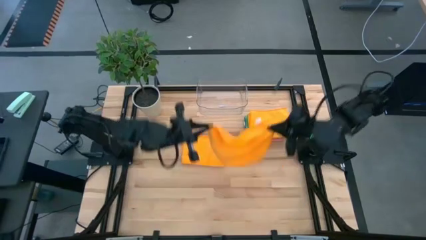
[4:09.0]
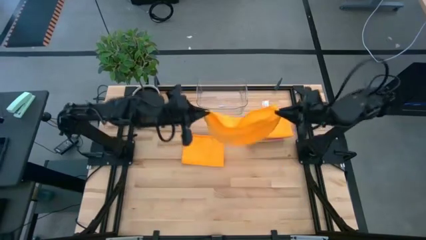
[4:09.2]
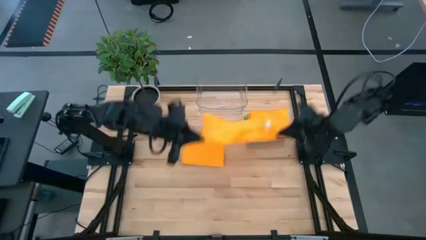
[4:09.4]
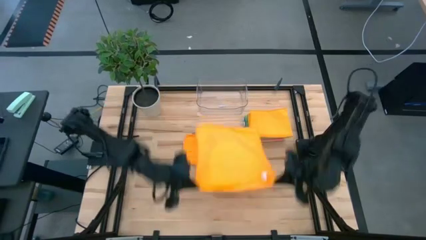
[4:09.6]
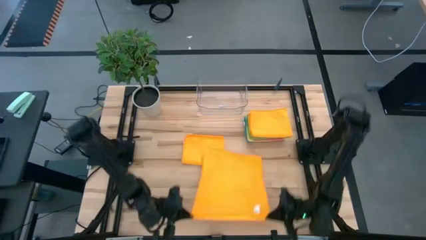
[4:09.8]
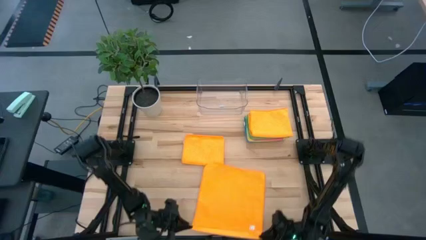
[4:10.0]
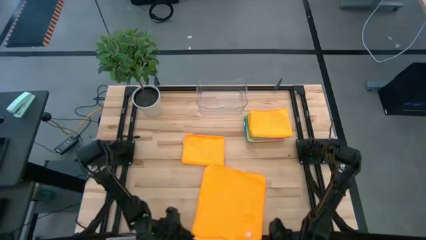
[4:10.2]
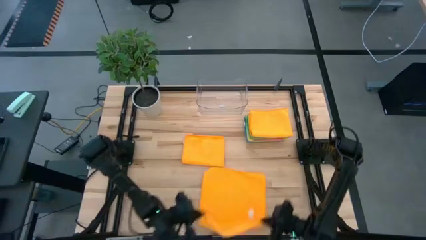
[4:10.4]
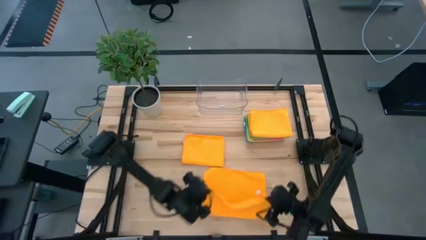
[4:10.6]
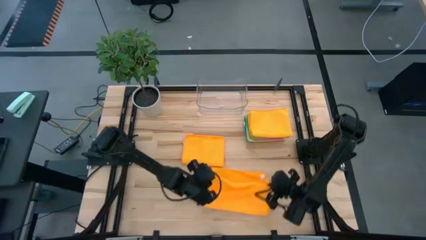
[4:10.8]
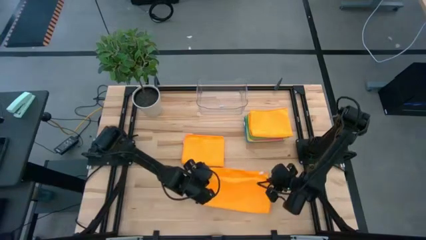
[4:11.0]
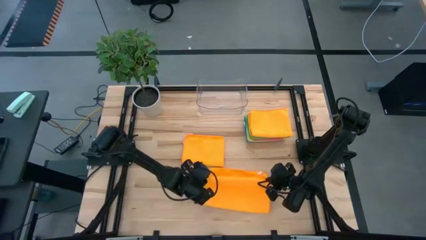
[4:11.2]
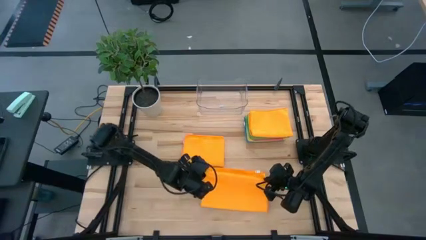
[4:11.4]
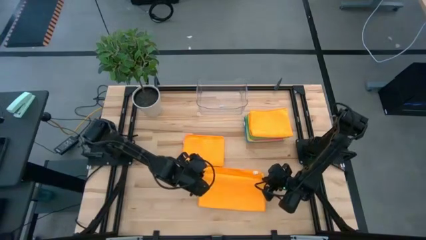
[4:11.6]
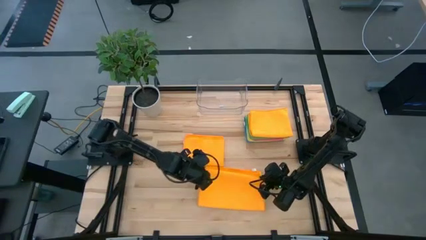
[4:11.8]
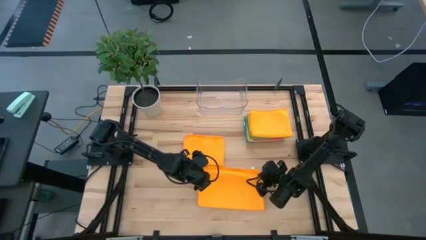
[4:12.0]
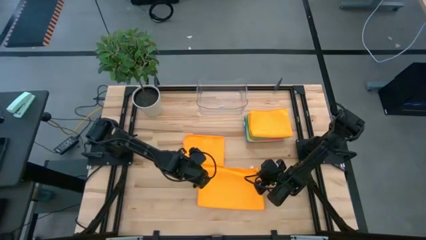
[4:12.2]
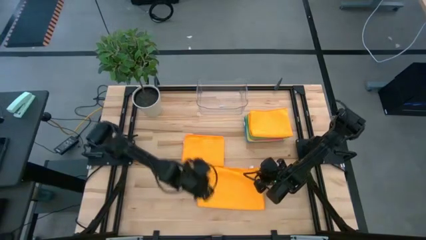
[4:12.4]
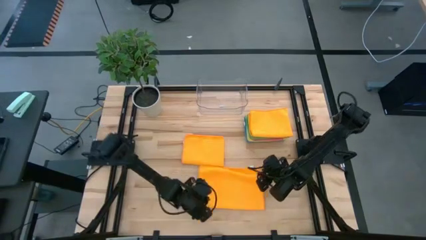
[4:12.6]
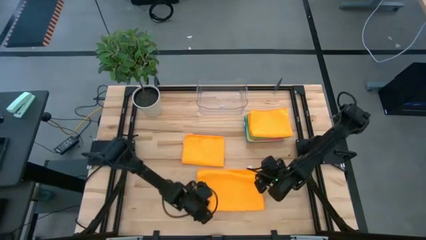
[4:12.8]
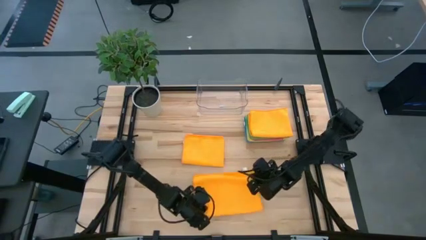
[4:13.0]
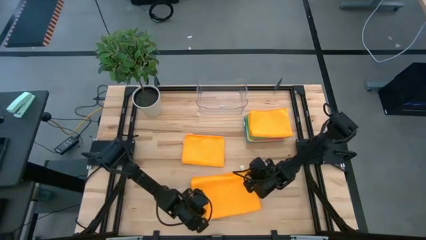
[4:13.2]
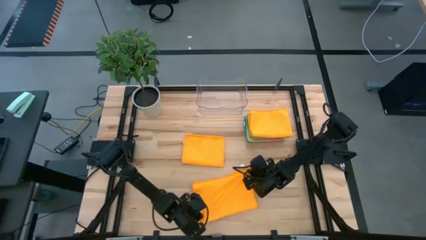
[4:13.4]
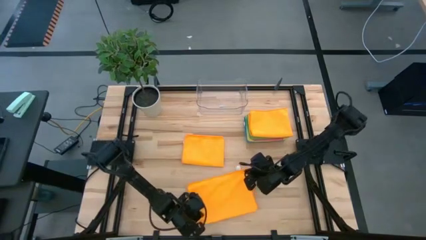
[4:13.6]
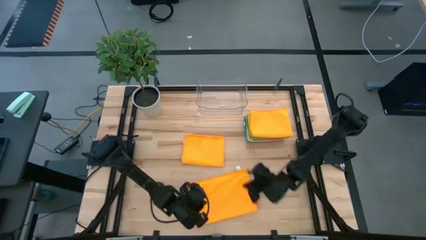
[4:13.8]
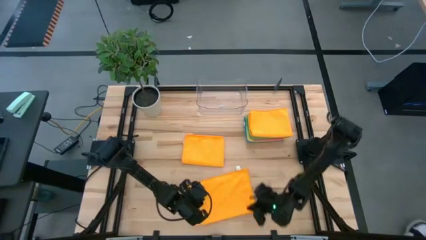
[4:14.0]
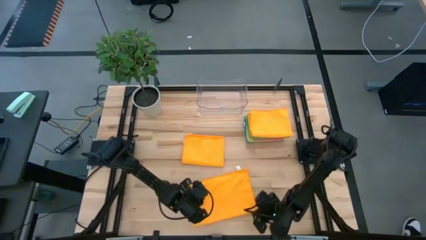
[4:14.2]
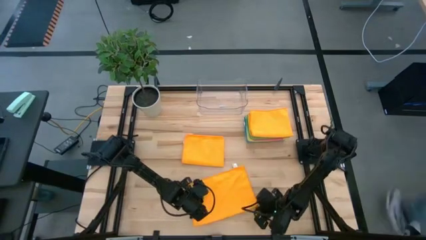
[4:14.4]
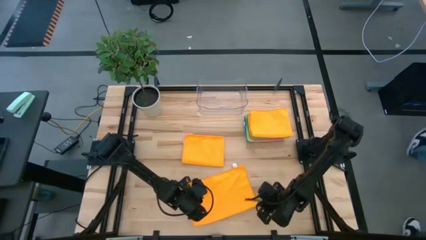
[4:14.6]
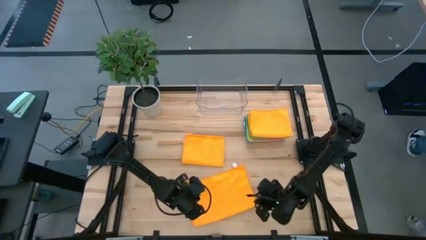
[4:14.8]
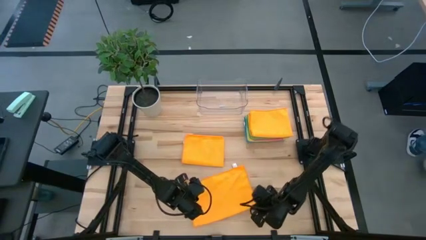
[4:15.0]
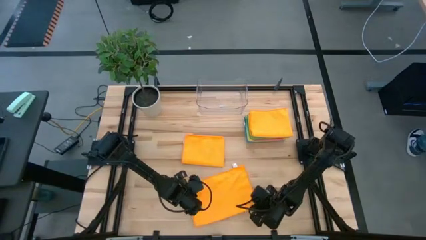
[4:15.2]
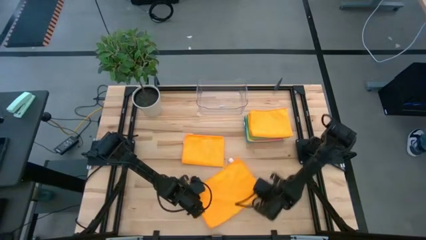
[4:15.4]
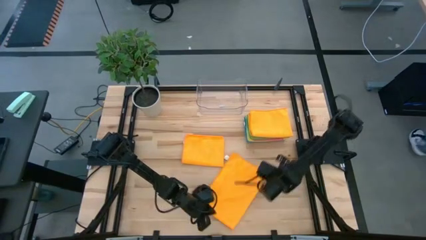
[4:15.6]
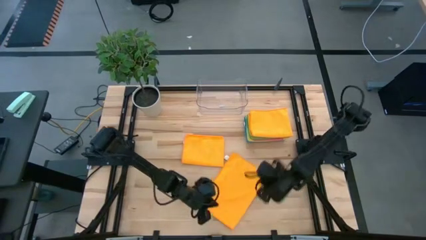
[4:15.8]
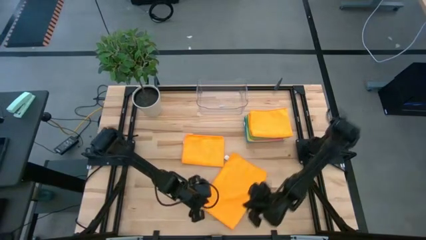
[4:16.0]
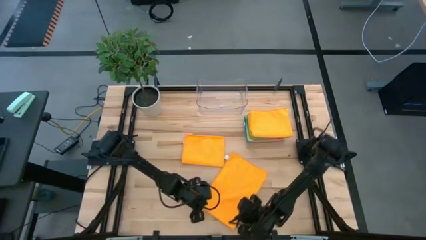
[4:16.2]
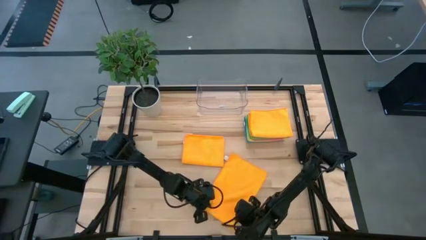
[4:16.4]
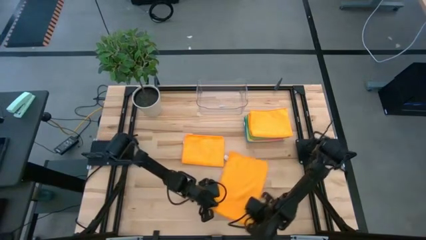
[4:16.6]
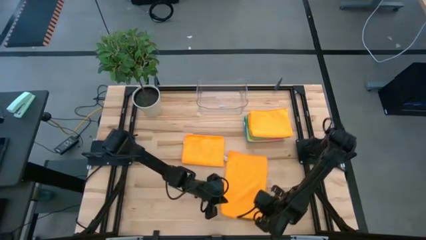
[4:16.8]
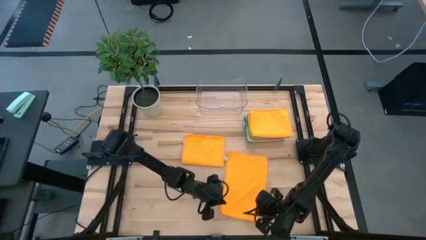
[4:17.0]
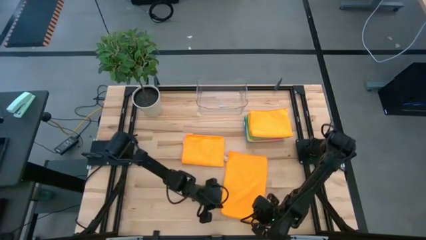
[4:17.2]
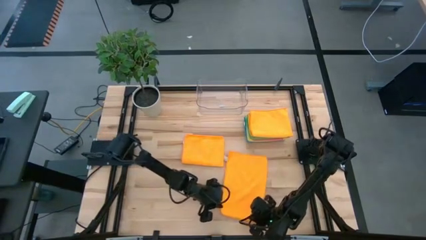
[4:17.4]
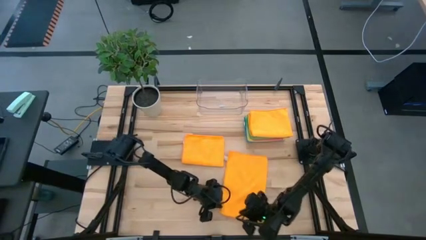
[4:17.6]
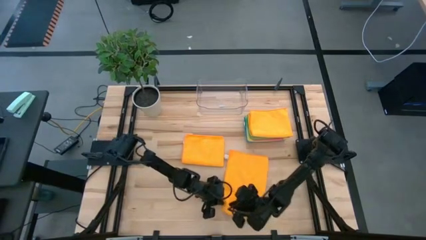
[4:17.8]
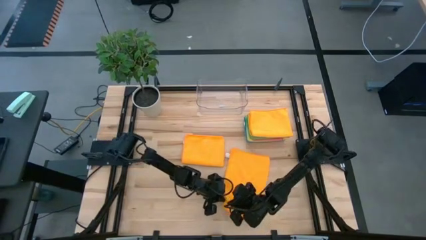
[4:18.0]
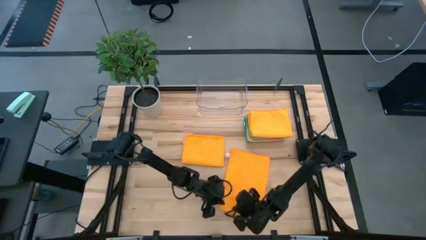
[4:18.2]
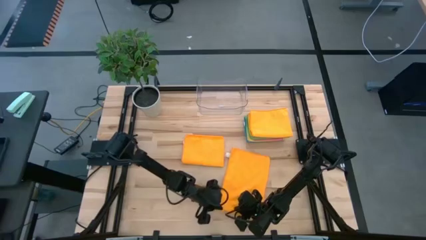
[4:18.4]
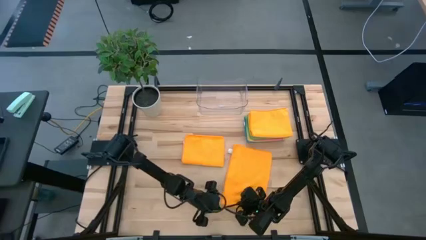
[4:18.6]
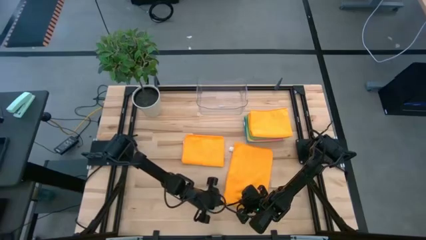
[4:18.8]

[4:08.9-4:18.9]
Task: Fold microfiber towels
Fold the bottom orange towel

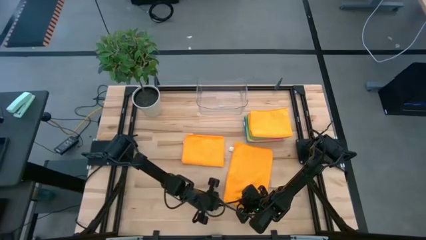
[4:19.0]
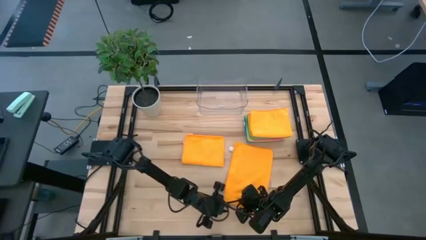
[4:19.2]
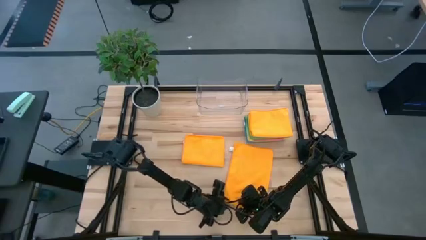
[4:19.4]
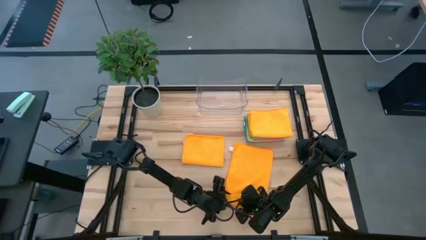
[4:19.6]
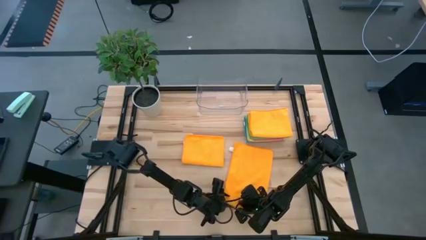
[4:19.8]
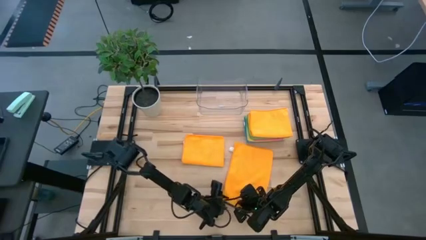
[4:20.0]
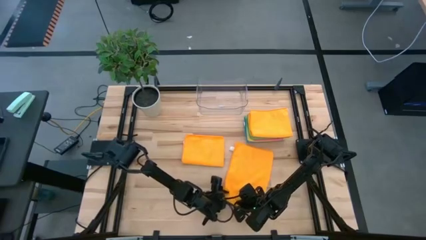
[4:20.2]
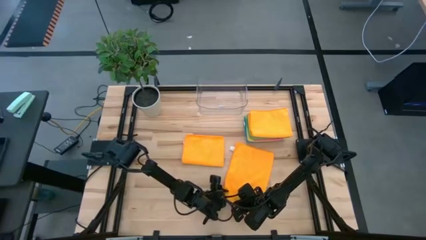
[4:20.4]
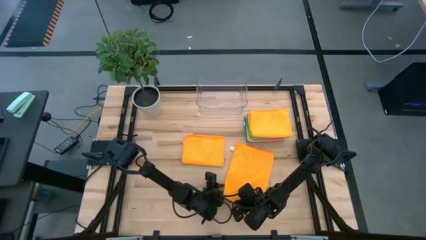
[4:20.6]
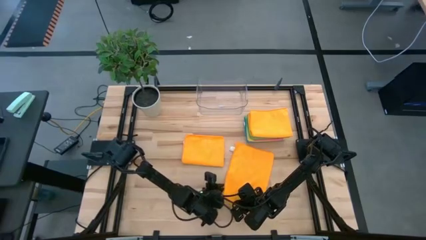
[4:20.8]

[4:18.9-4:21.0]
Fold the bottom orange towel

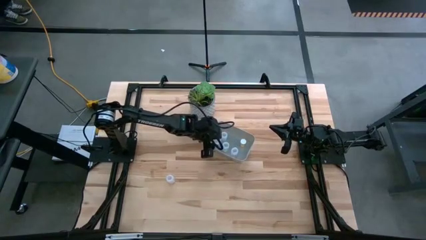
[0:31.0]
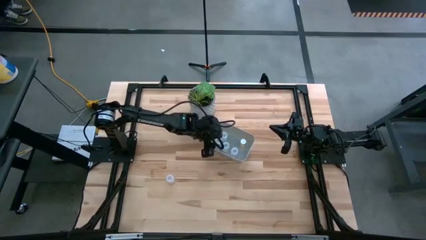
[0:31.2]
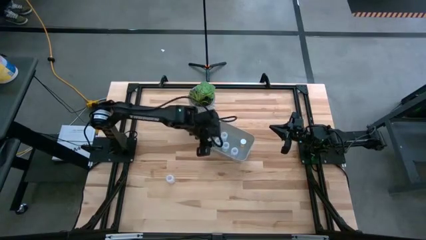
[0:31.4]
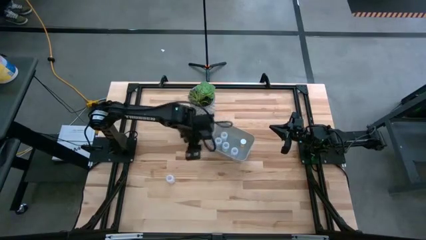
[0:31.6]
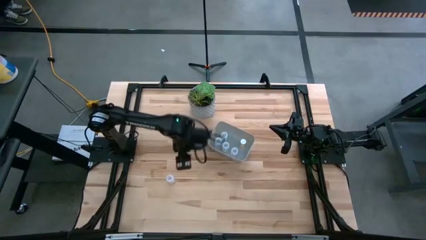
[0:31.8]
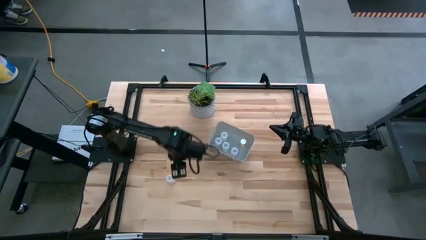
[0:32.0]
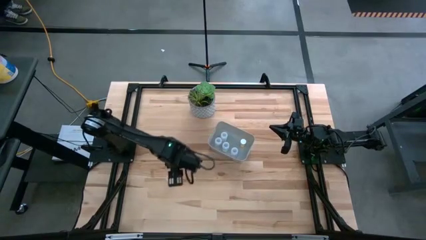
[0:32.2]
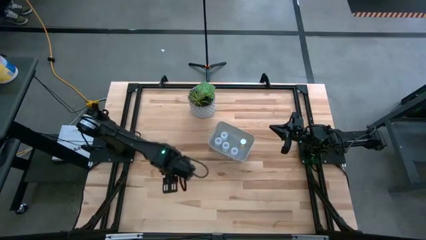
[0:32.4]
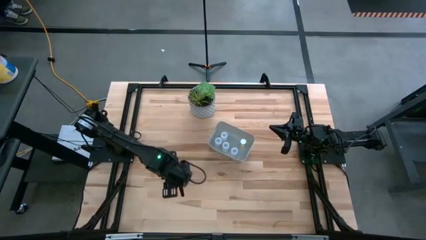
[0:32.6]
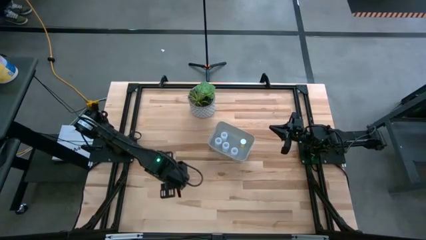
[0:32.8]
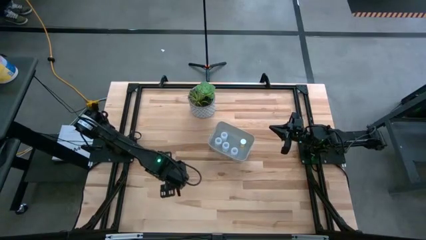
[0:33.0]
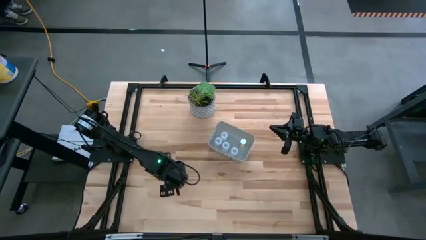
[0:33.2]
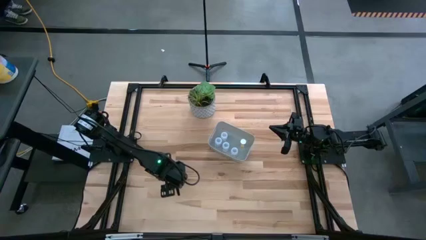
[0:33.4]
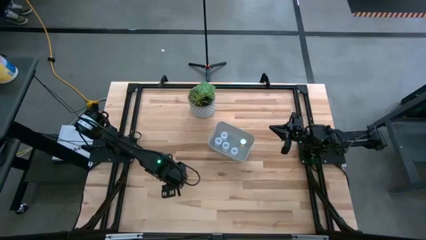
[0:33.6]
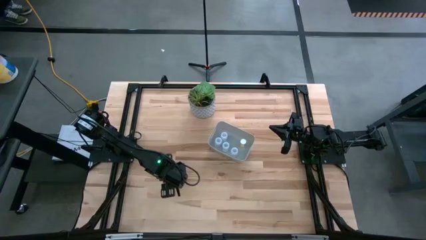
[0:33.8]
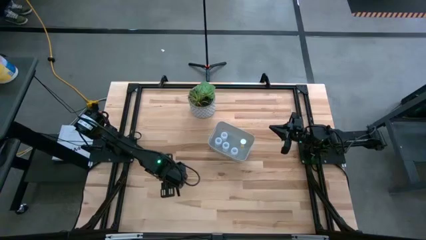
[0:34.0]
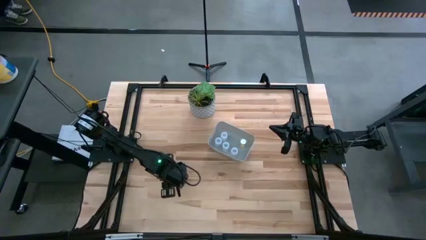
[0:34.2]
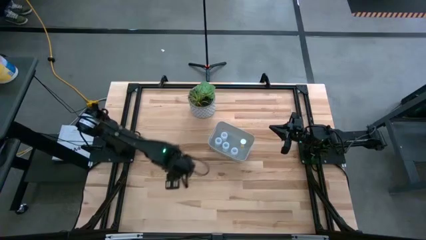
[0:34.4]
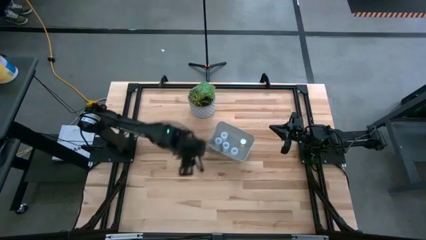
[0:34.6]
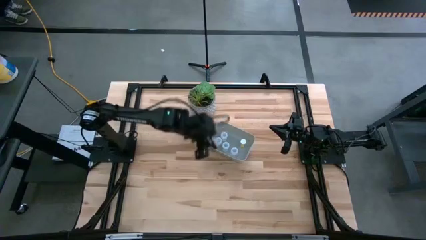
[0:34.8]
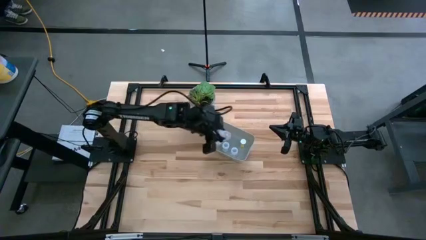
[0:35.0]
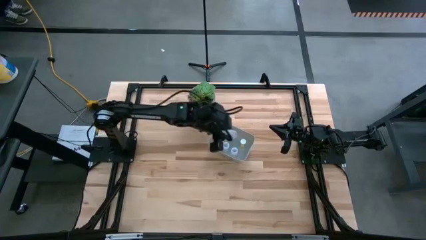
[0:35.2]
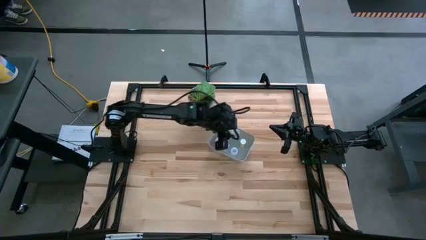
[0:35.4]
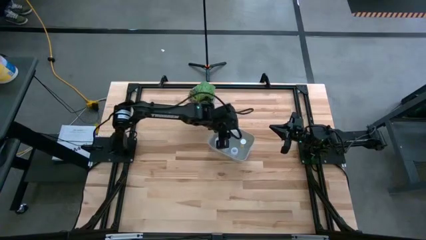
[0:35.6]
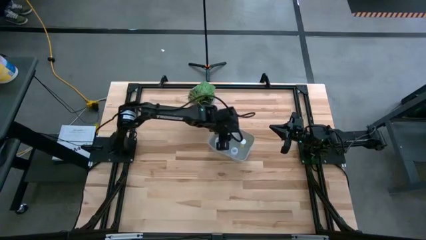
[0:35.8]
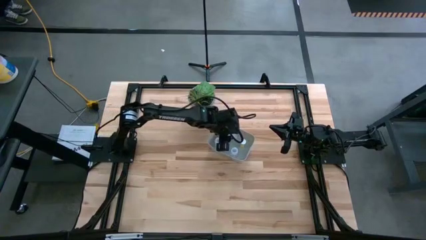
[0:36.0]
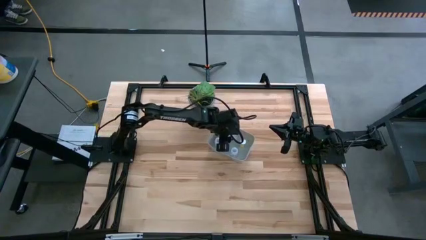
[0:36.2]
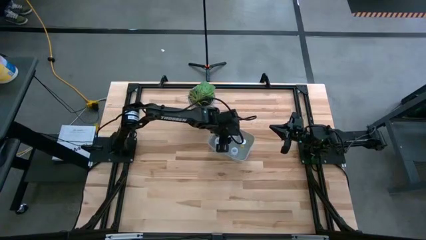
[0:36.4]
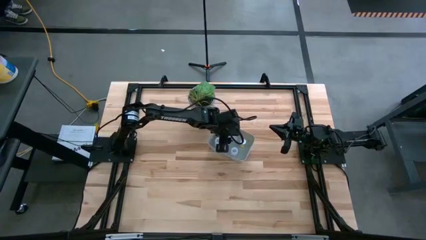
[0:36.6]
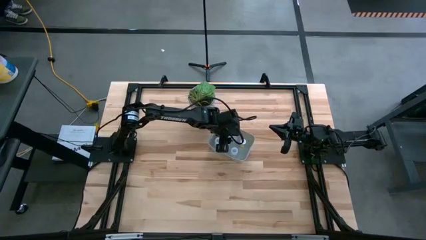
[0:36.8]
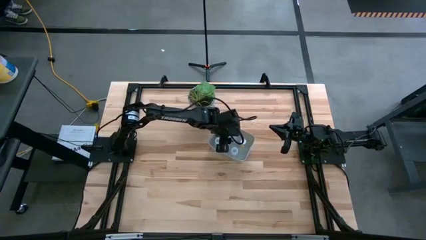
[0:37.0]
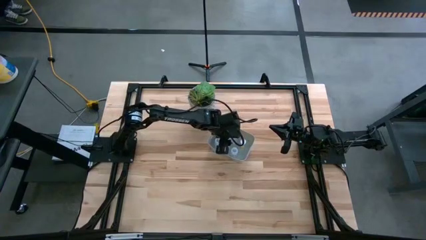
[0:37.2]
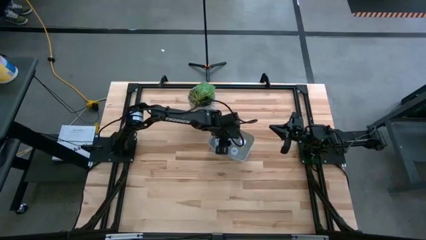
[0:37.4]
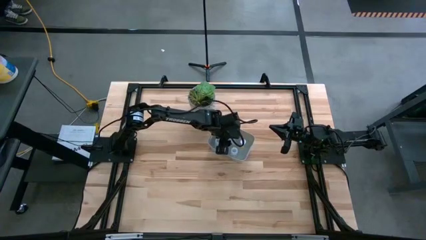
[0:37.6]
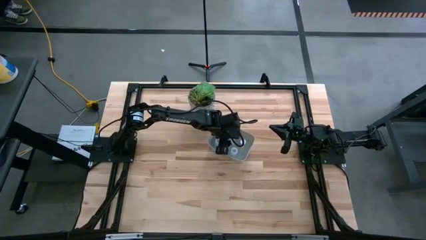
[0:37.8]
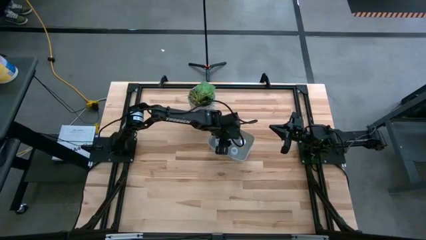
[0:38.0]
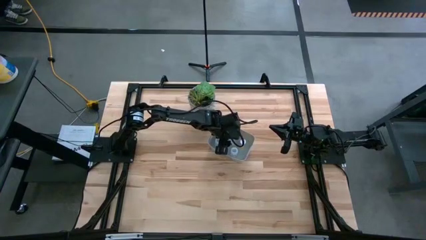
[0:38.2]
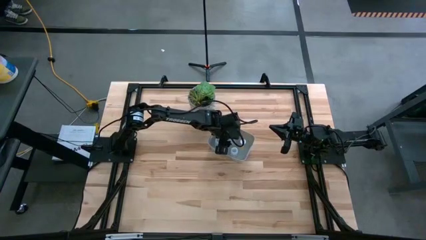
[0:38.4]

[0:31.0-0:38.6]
Task: Pick and place pill bottles into a basket
Put the transparent pill bottle into the white bin
